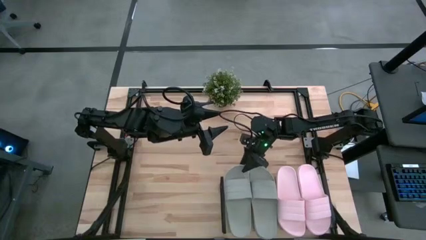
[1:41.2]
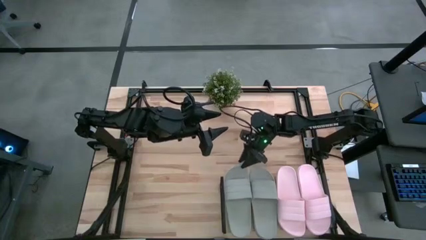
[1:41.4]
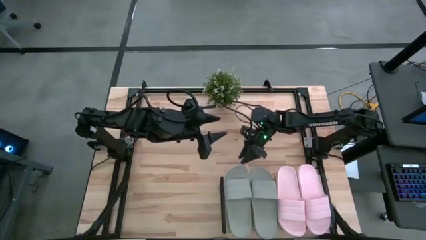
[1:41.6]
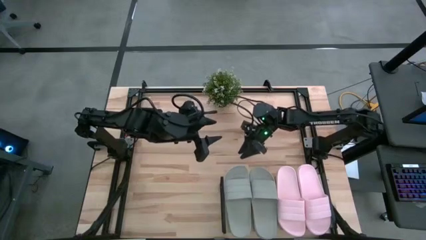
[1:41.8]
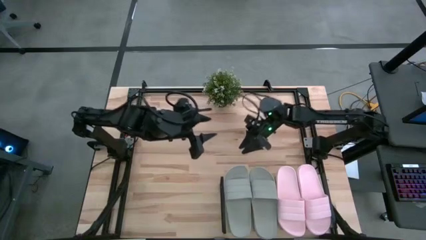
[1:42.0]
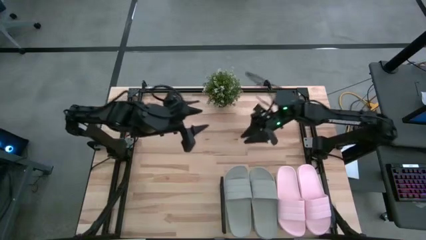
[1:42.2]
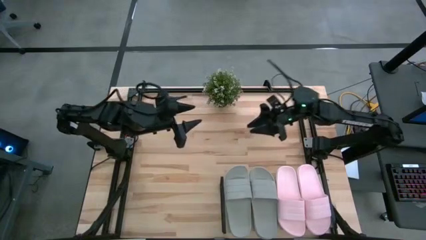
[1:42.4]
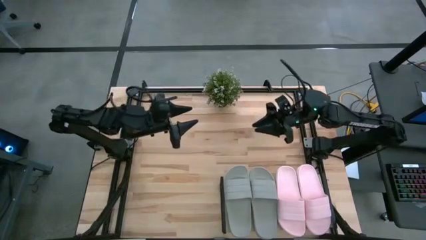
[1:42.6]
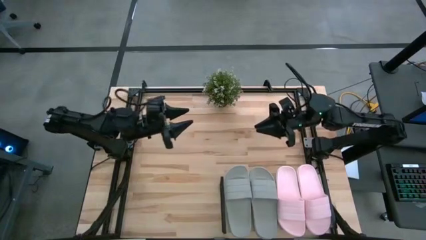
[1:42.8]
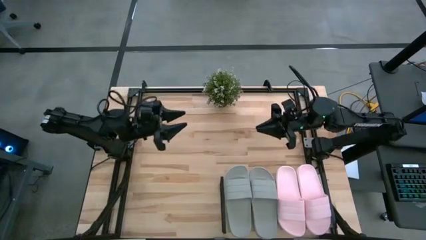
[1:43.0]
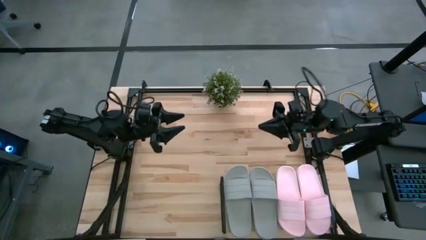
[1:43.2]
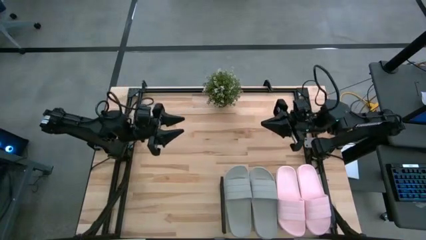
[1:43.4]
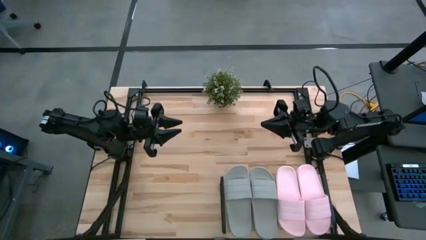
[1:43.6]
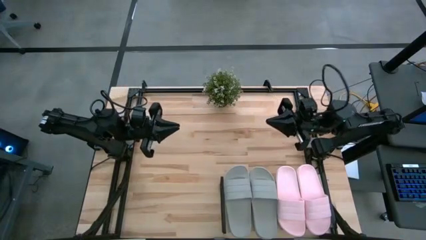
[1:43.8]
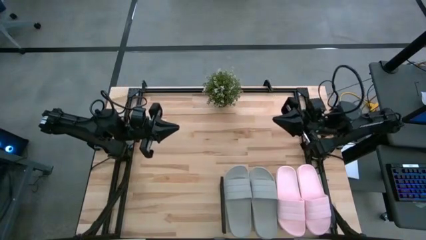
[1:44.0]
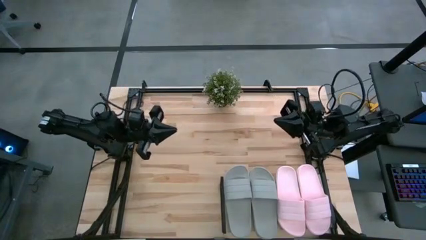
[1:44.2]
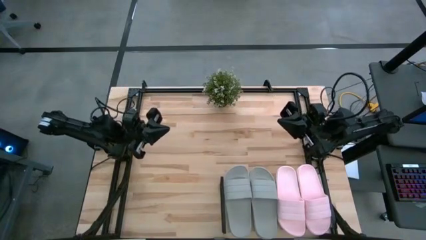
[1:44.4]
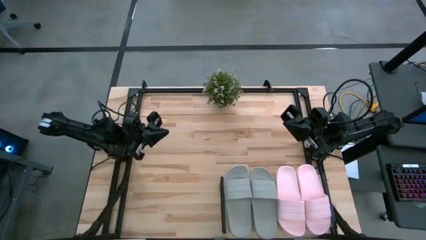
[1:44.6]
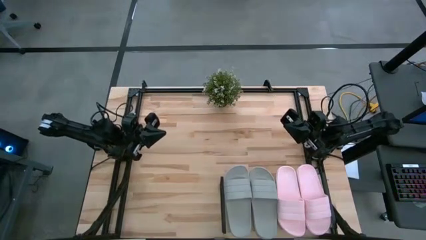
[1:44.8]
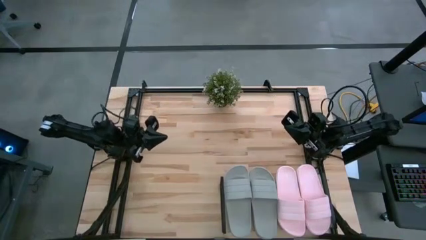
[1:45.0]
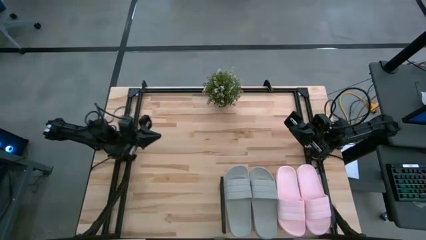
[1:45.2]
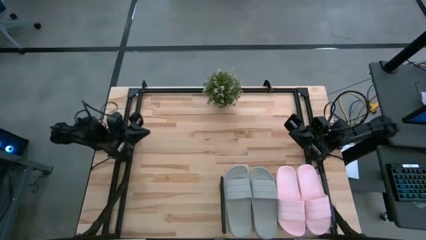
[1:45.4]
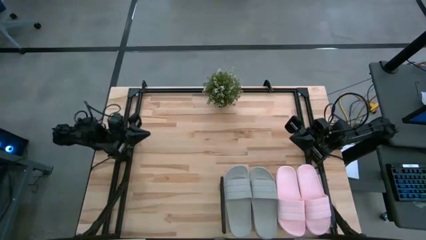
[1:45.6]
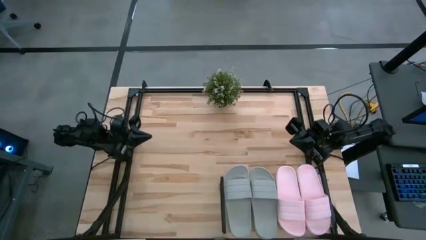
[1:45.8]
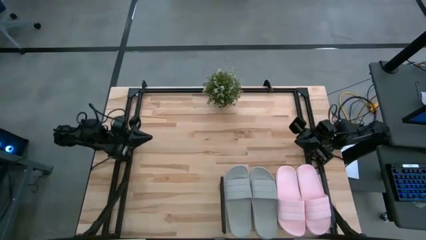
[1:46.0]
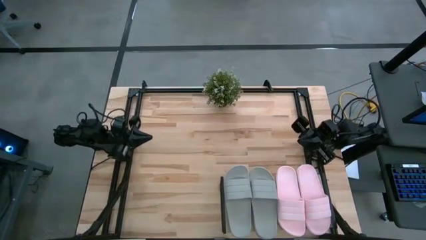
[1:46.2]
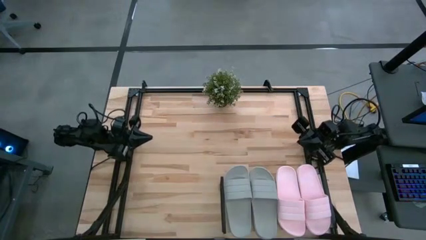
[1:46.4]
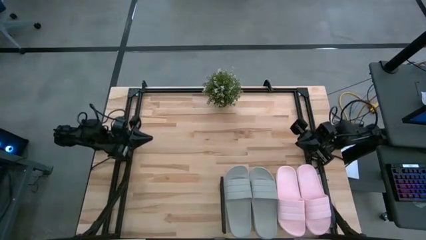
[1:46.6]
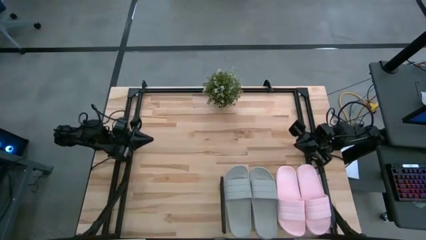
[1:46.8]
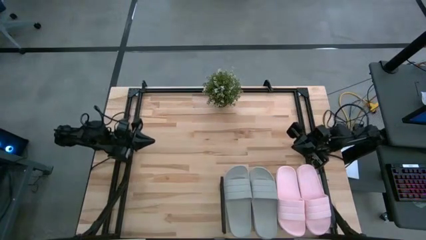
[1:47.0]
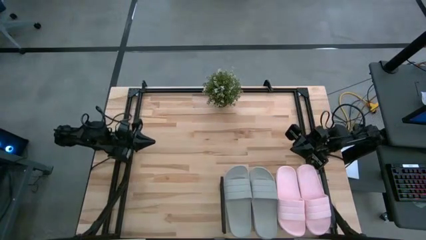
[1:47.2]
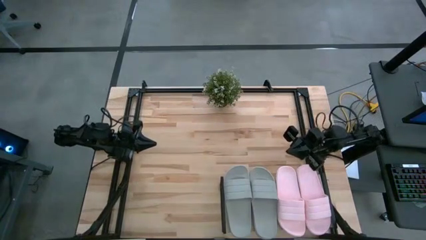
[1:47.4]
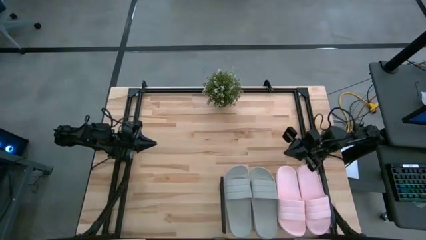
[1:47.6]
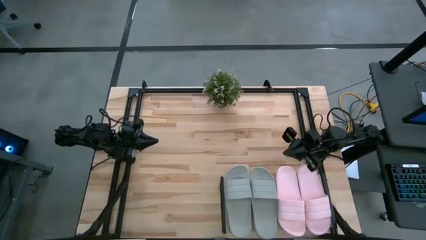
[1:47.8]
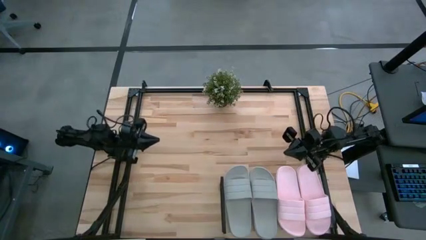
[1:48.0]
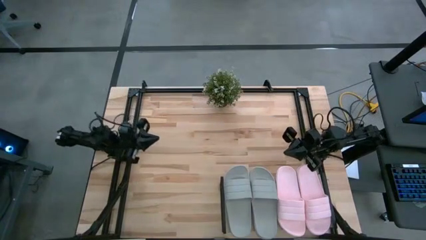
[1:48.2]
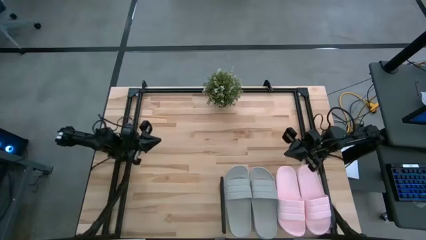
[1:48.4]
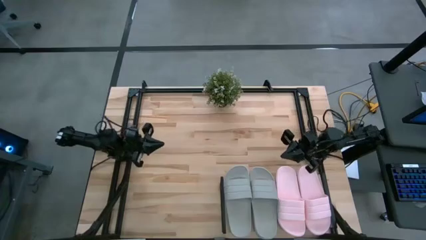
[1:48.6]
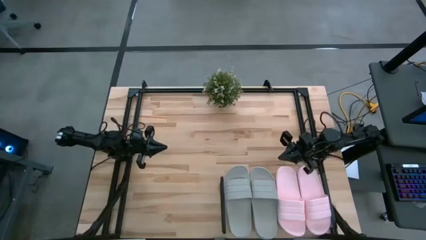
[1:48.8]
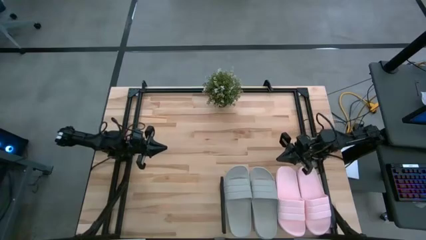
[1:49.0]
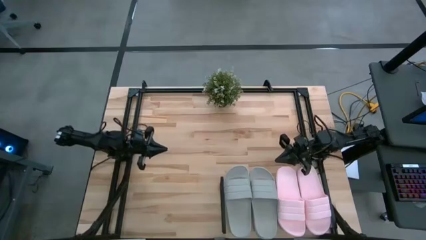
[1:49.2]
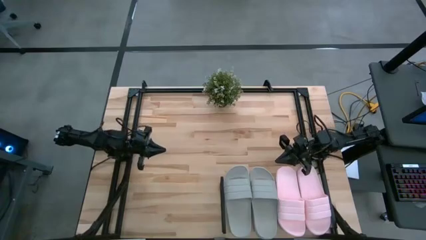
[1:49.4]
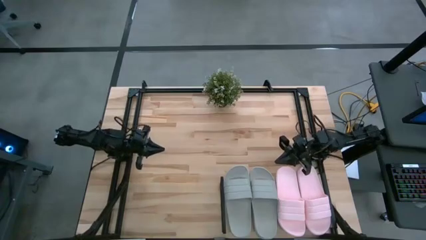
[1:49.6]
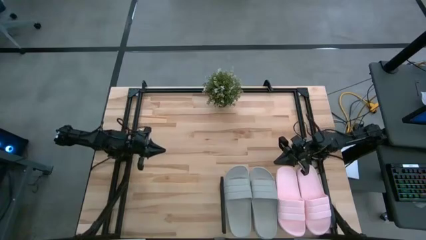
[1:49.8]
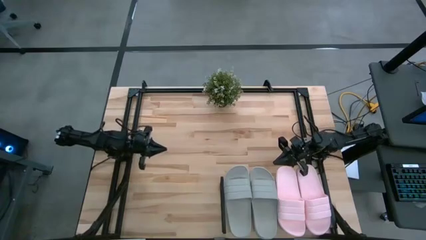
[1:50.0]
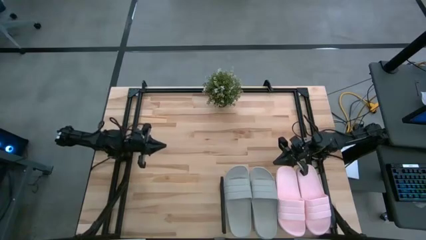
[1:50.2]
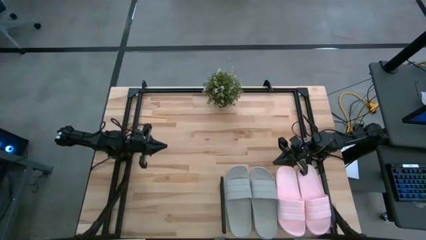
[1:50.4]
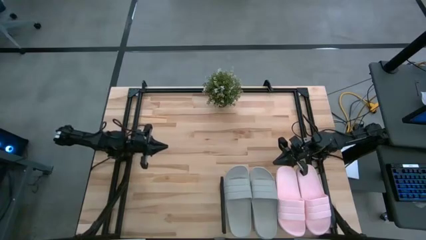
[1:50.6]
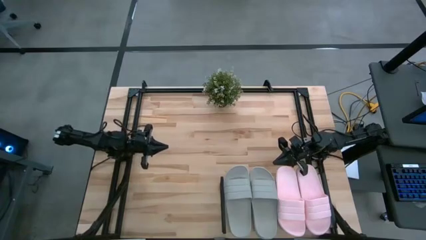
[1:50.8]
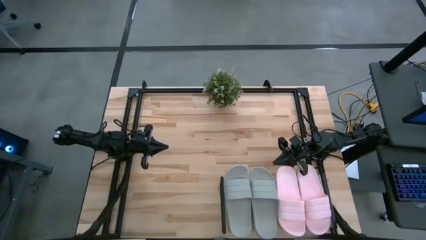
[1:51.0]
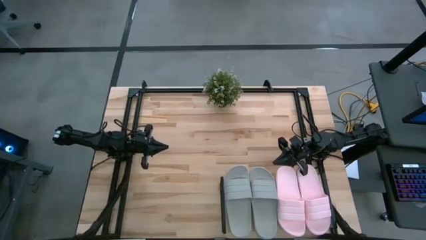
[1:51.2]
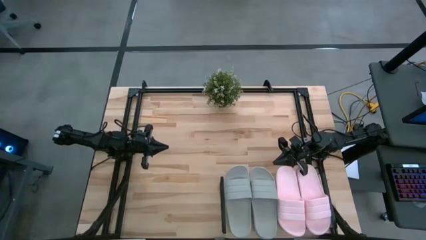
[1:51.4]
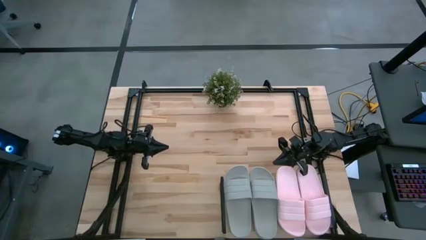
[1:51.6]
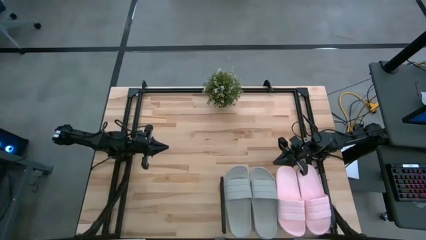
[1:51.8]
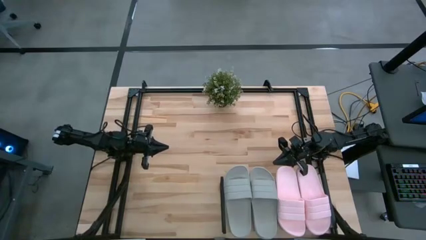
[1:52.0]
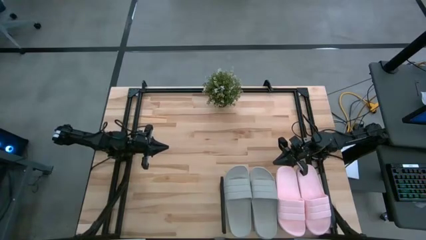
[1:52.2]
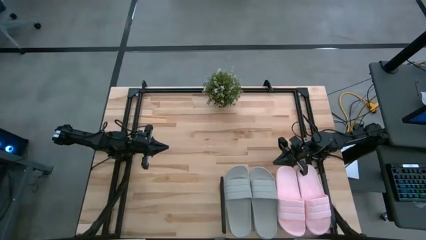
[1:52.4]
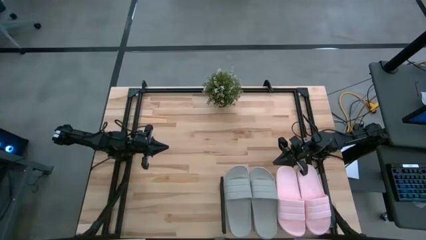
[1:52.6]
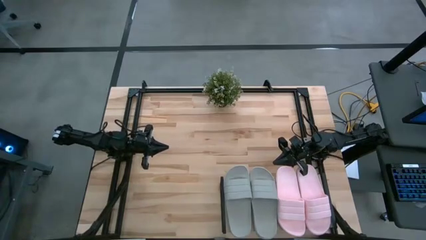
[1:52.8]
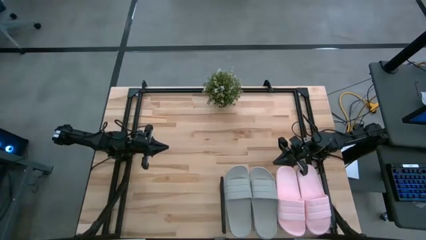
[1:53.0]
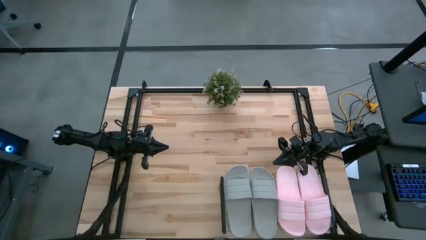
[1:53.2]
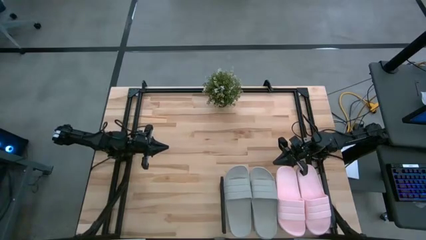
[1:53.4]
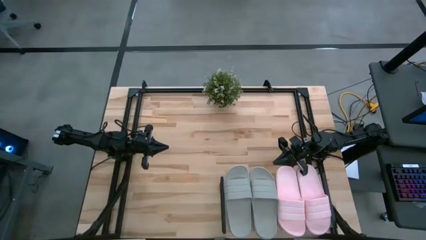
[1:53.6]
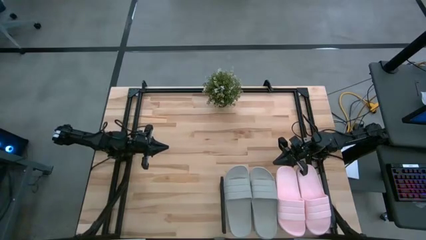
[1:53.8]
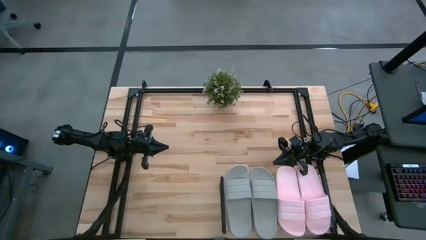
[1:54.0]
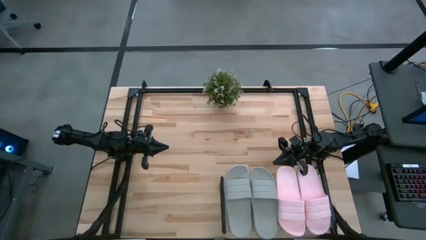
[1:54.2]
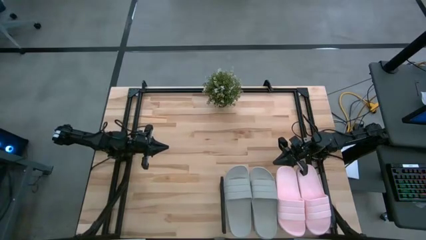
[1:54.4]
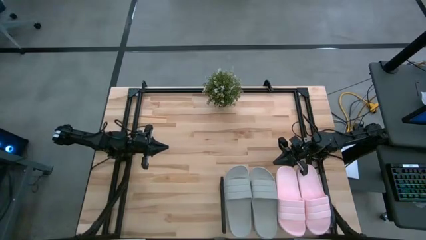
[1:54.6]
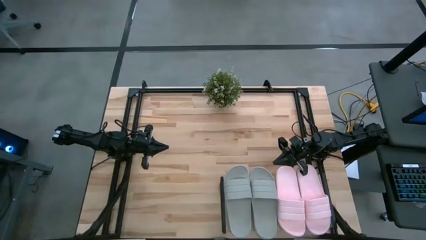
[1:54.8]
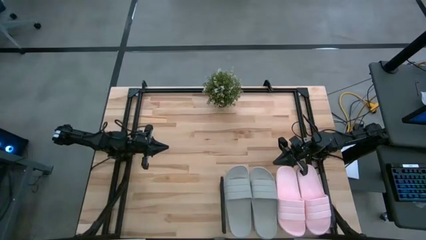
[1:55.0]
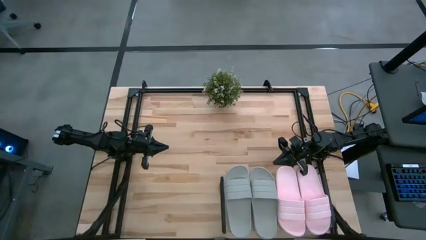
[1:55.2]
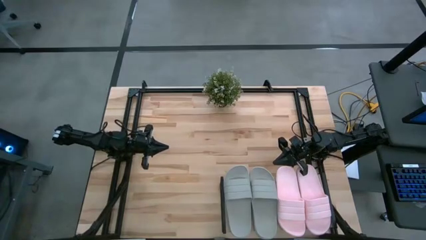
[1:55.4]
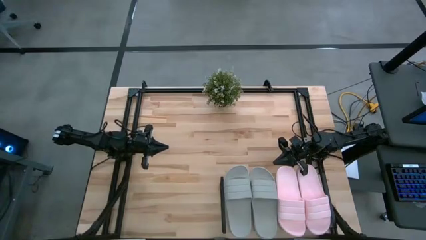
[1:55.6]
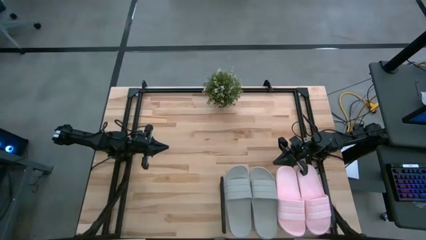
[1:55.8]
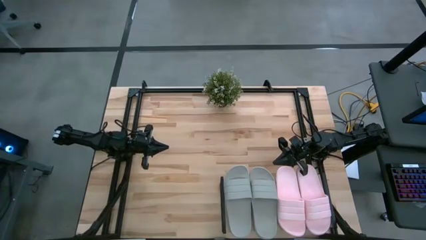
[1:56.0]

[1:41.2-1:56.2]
Task: Pick and place slides into the shelf
Return to Home Position

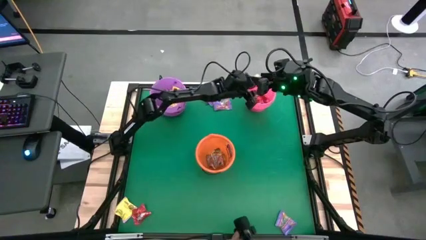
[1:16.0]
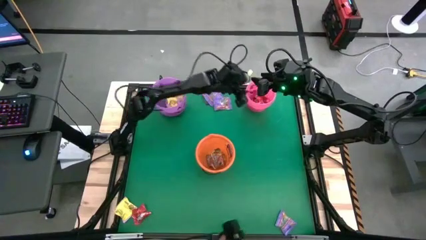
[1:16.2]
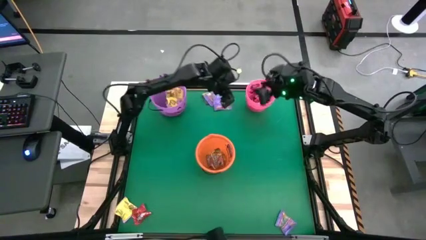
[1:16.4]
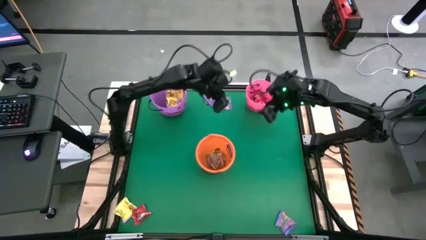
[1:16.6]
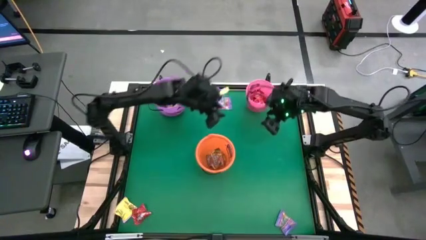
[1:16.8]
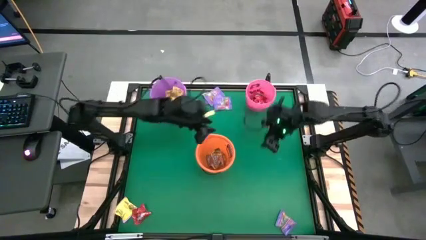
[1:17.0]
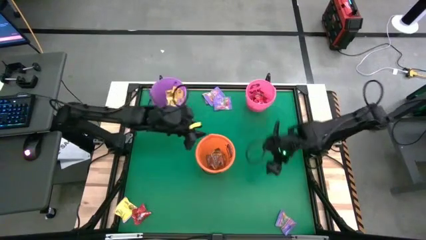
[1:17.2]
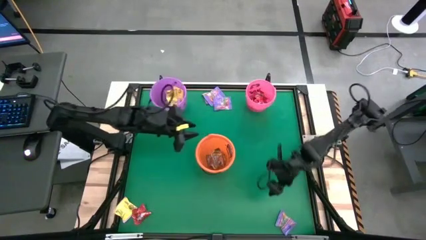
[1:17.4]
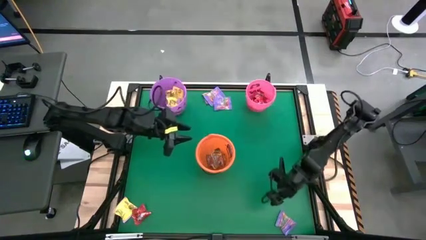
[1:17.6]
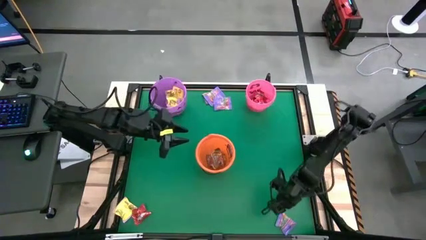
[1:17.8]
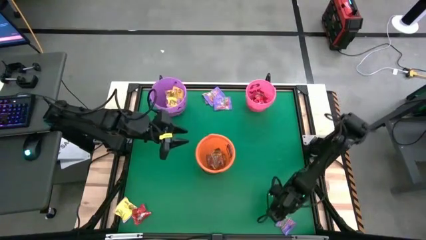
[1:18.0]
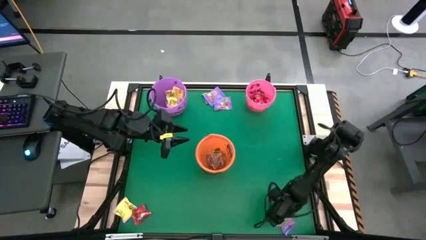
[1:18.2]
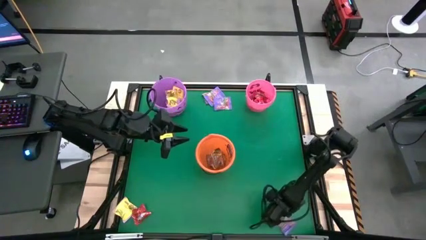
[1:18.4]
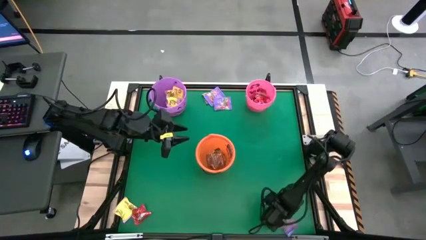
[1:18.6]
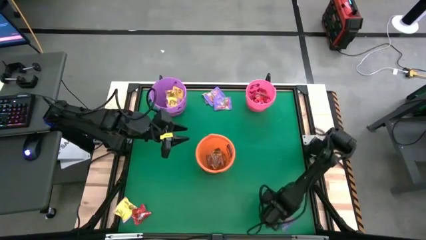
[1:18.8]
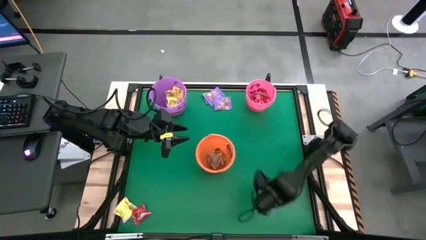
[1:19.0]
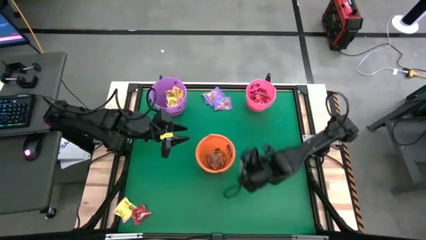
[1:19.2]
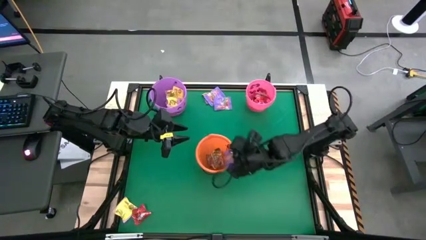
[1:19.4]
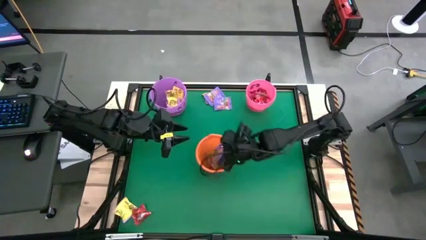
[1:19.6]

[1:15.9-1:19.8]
Task: Sort candy by brand, put in halloween buckets
Put the violet candy into the orange bucket
